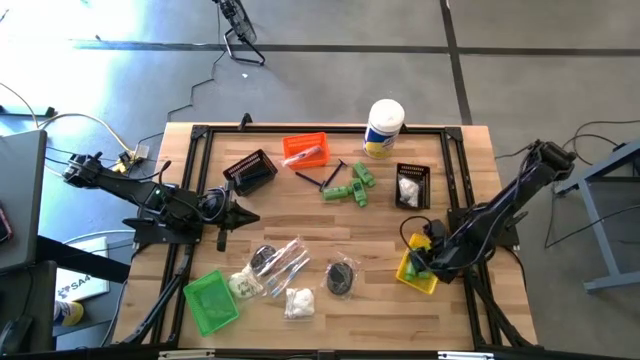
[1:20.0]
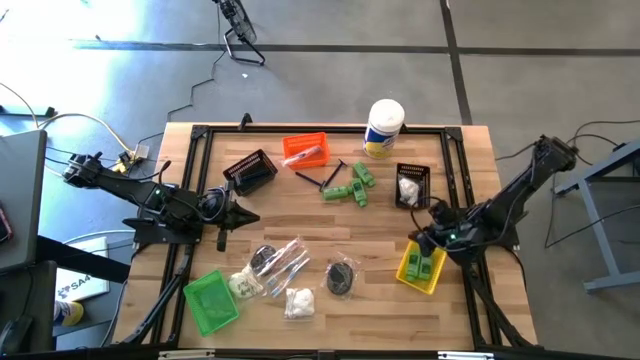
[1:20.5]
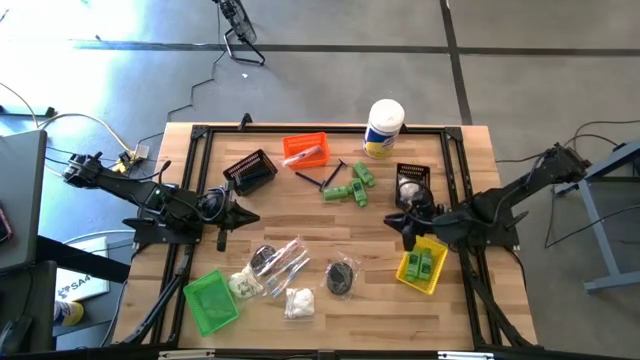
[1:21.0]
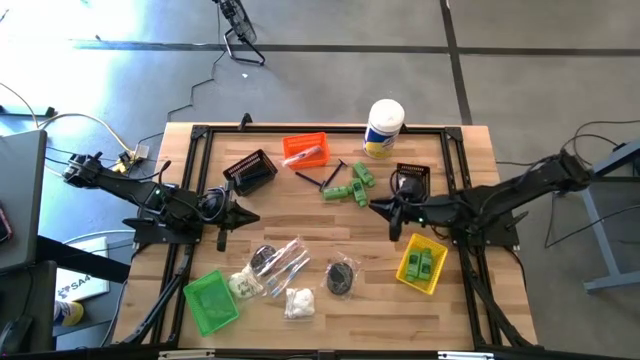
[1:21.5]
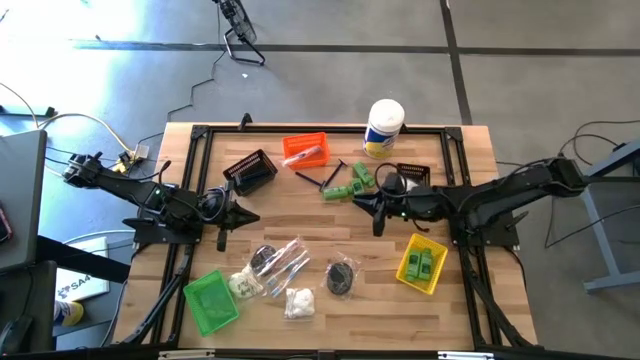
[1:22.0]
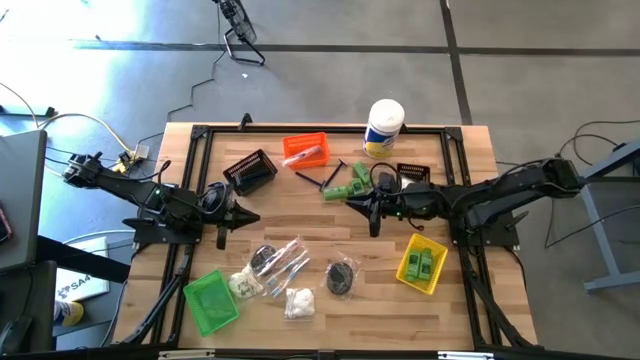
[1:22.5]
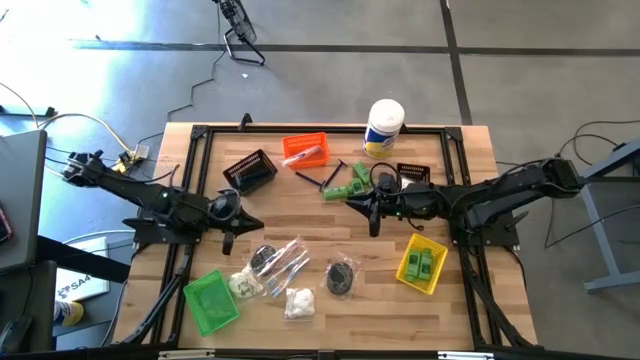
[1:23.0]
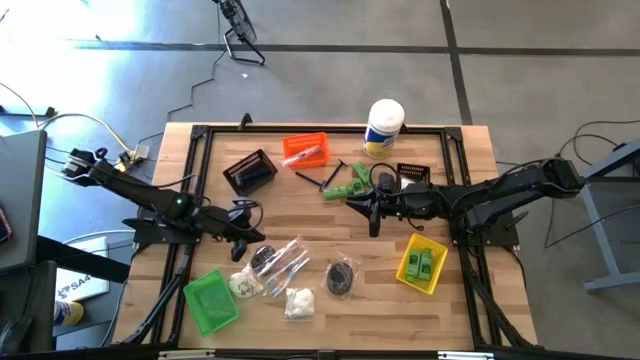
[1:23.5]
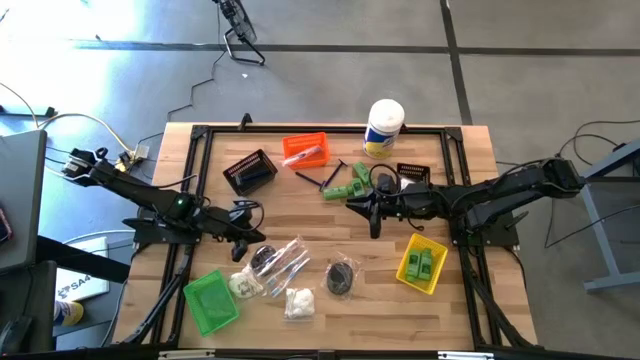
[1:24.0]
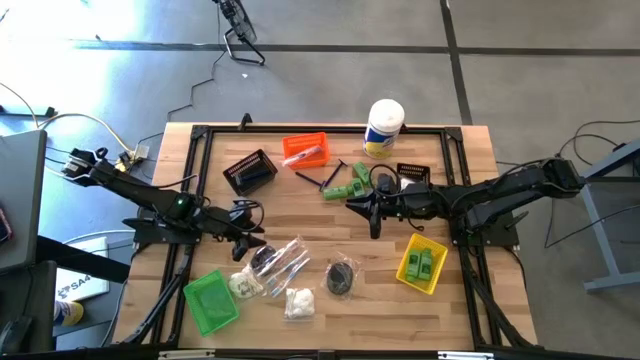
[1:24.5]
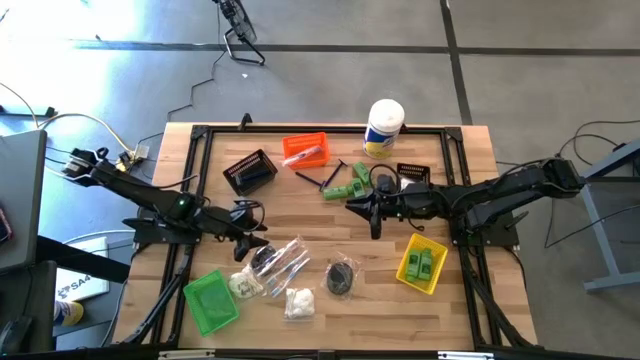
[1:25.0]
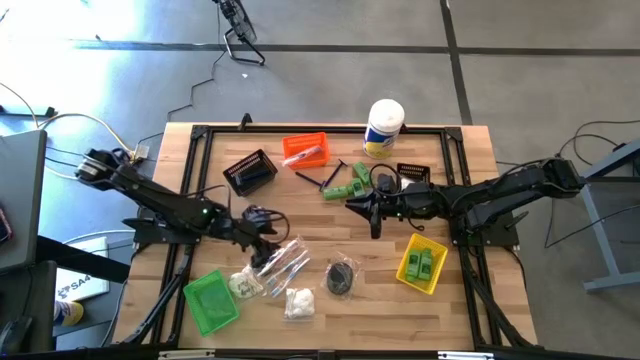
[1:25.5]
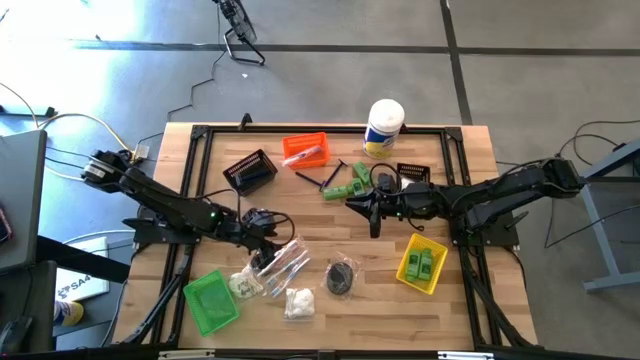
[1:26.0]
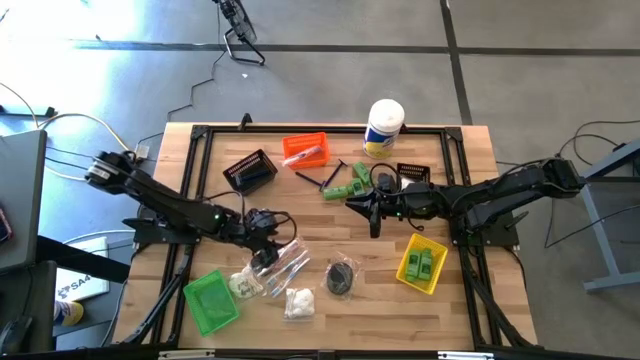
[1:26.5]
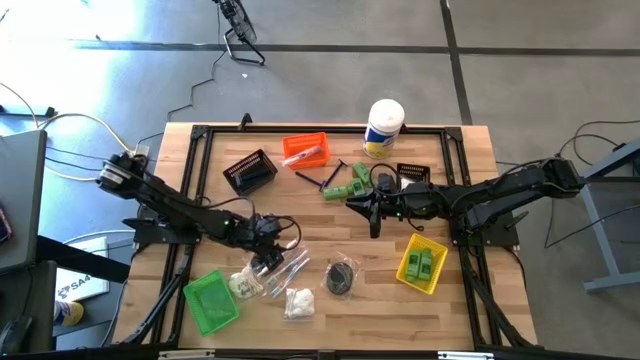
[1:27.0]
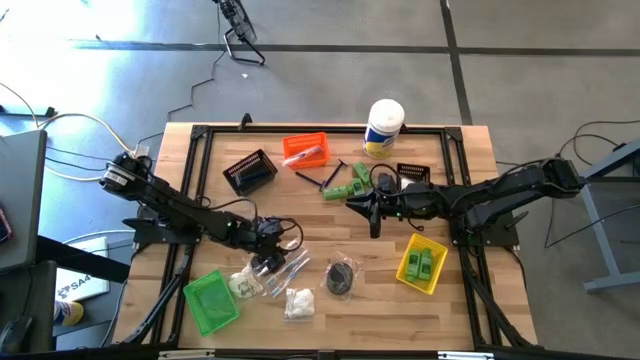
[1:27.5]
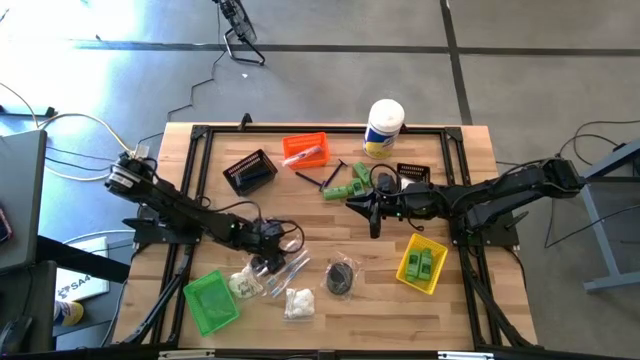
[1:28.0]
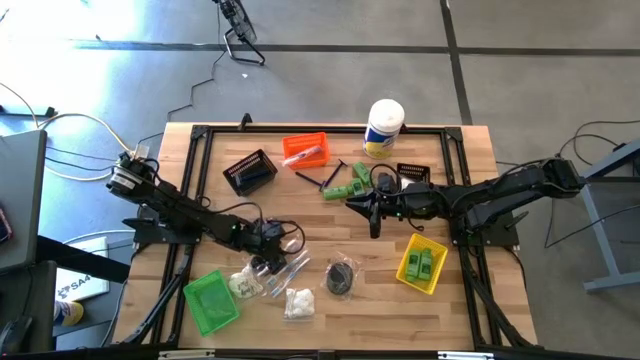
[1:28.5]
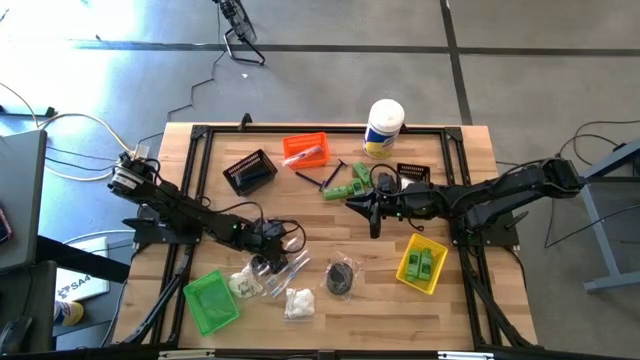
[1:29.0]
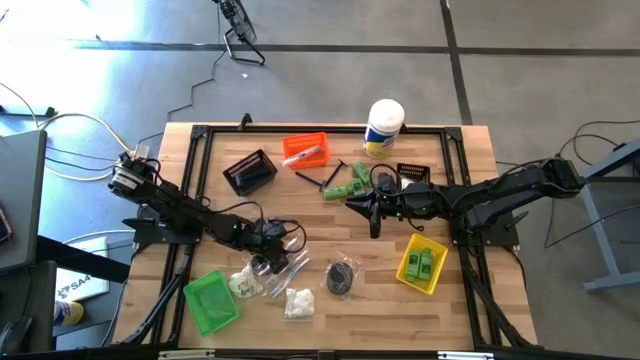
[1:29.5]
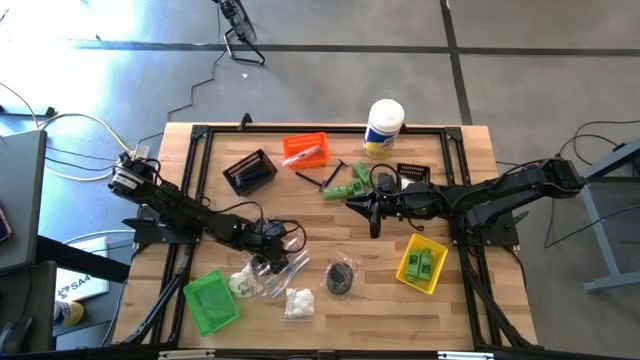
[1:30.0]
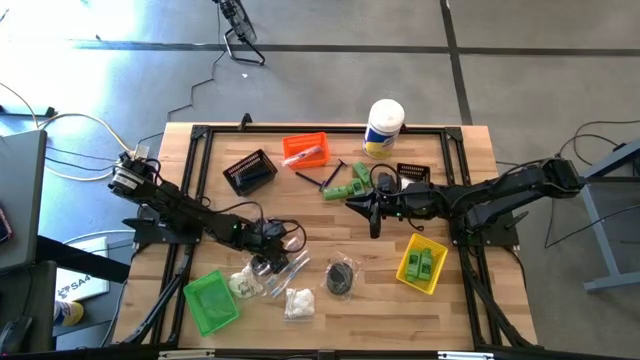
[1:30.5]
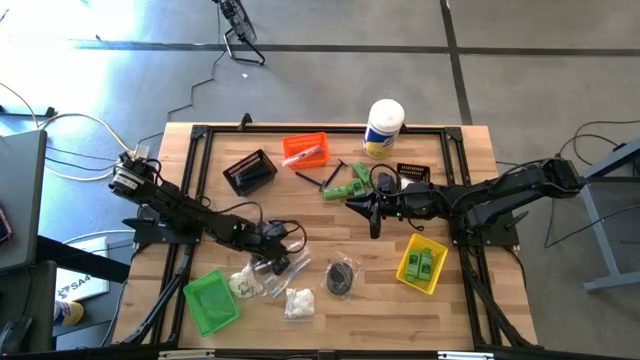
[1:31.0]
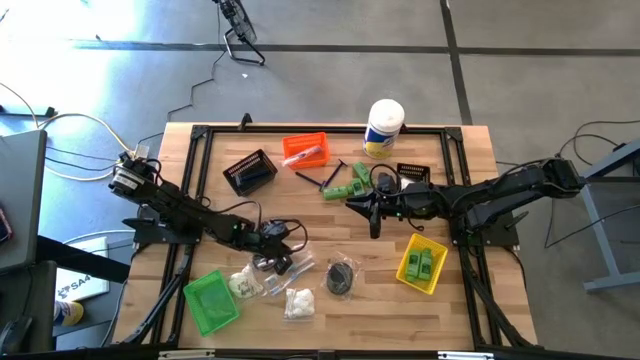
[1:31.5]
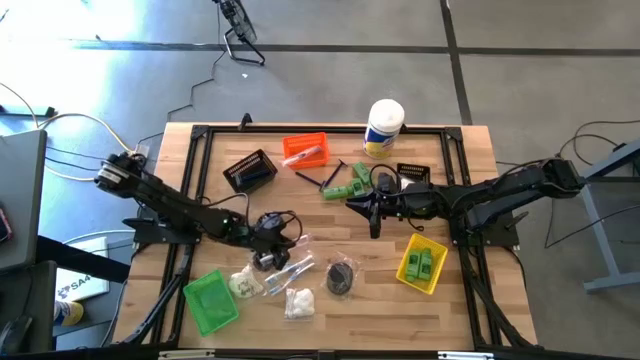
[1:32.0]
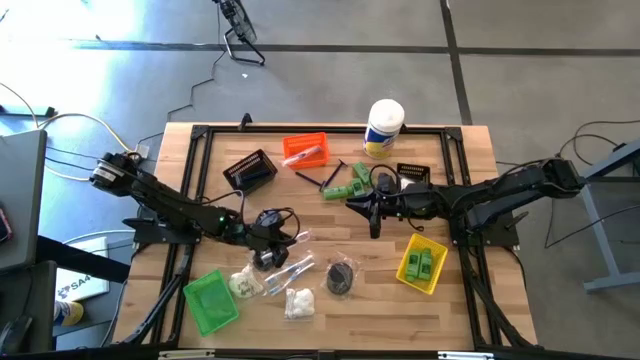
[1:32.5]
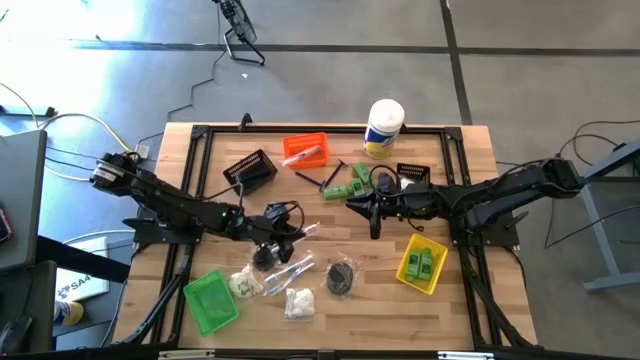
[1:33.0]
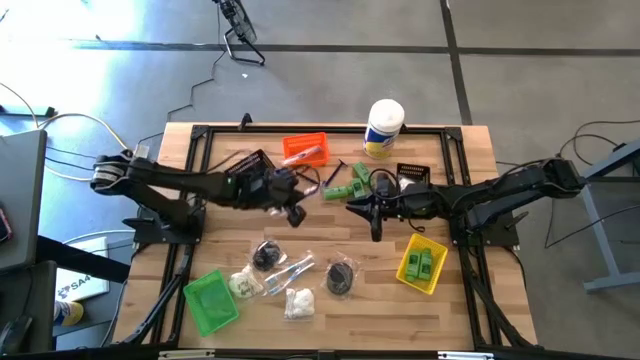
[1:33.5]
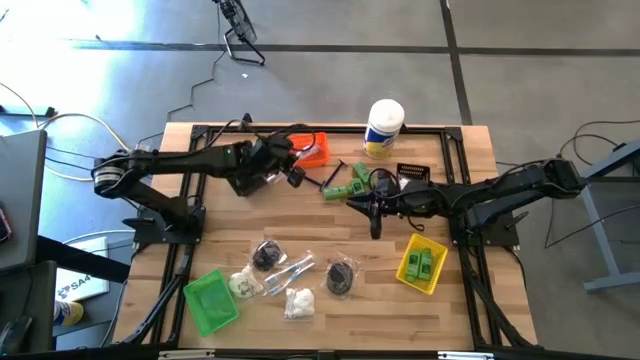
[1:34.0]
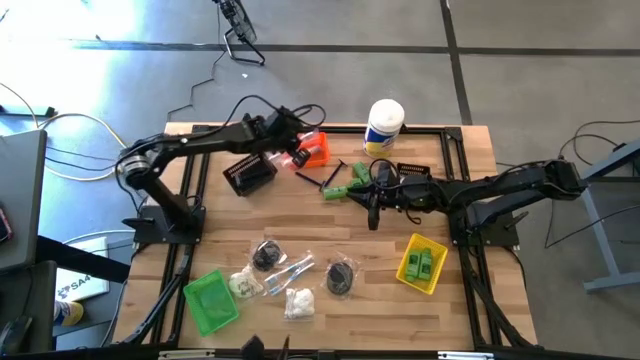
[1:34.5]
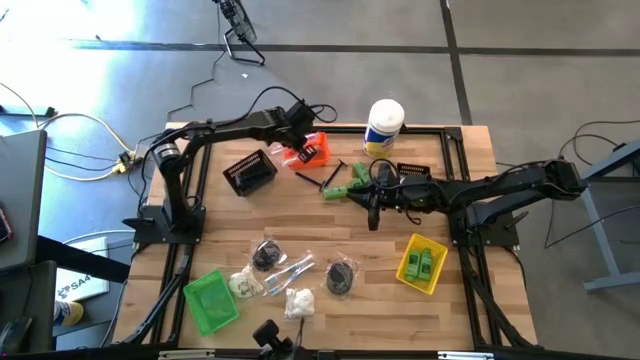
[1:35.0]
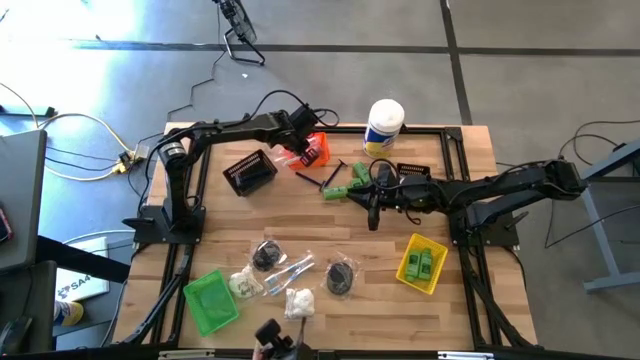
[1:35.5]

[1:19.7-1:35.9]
Task: Pick & Place Travel size toiletries
Put the red toothbrush into the orange bin

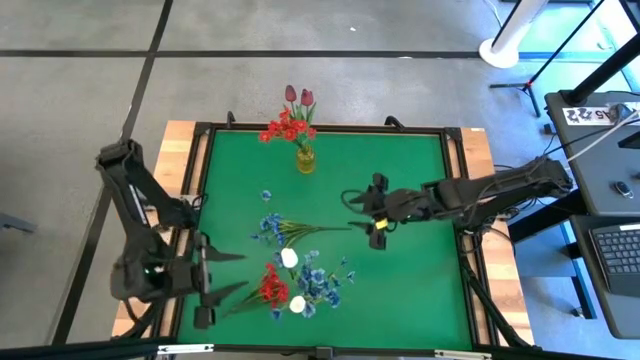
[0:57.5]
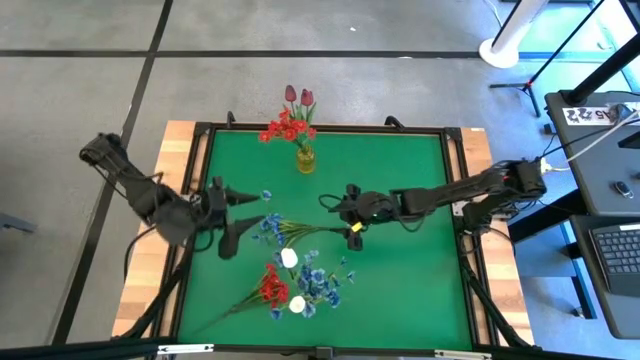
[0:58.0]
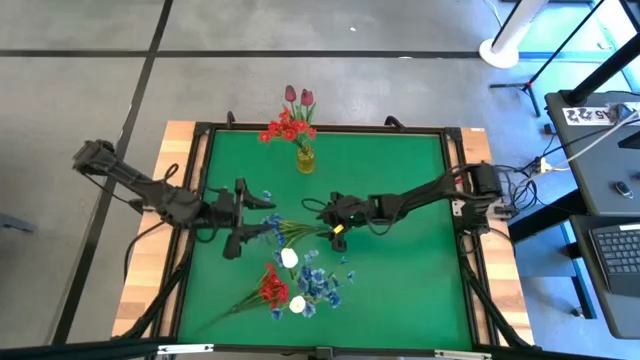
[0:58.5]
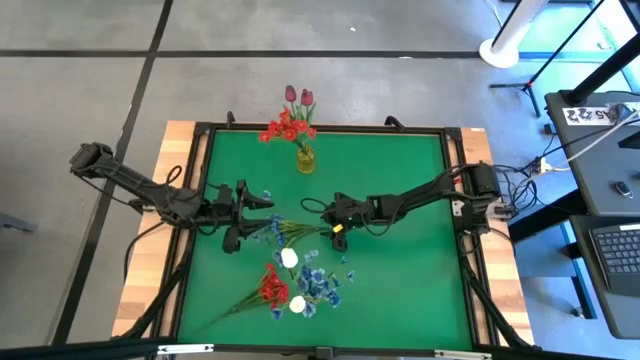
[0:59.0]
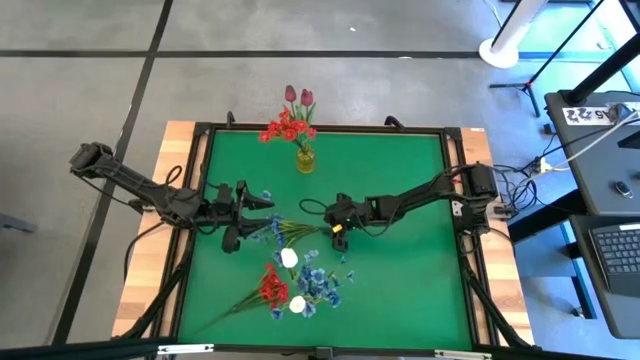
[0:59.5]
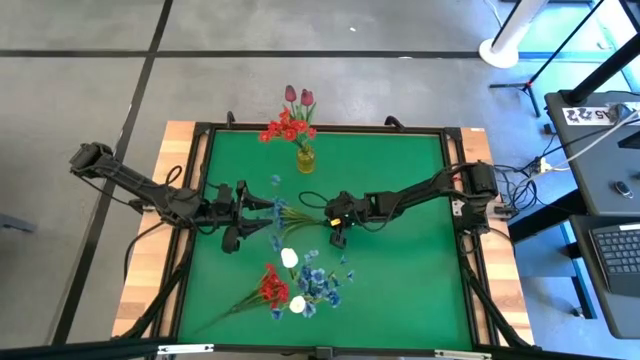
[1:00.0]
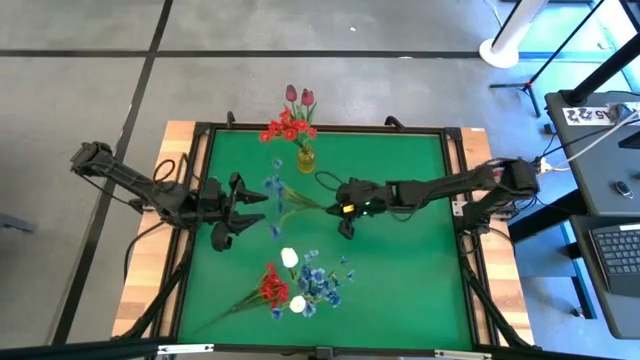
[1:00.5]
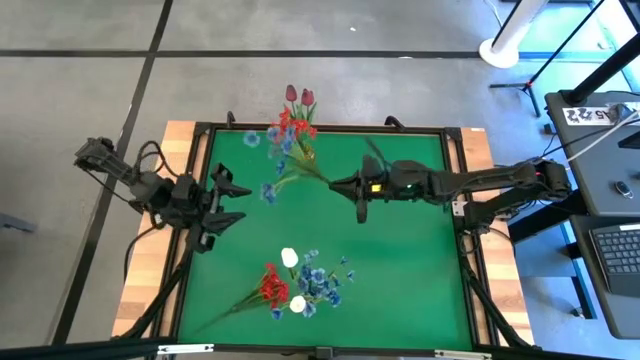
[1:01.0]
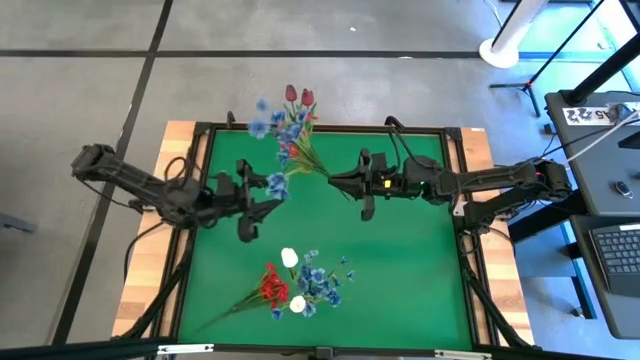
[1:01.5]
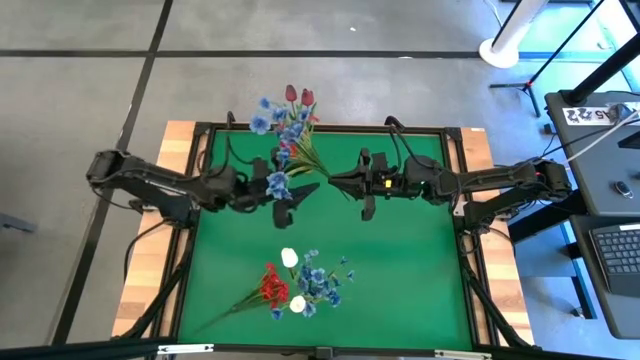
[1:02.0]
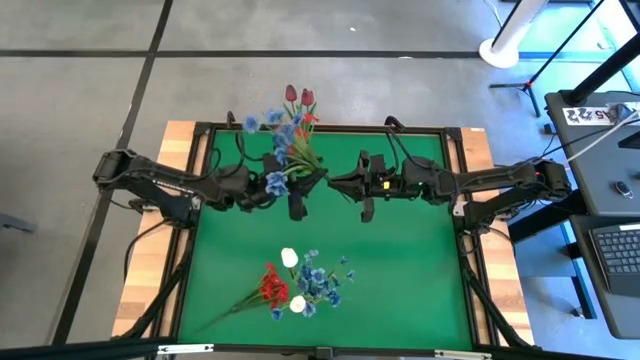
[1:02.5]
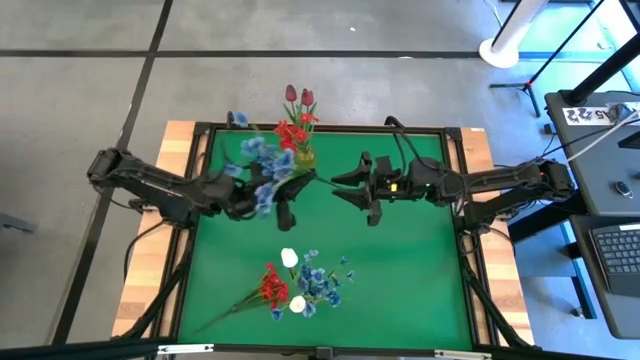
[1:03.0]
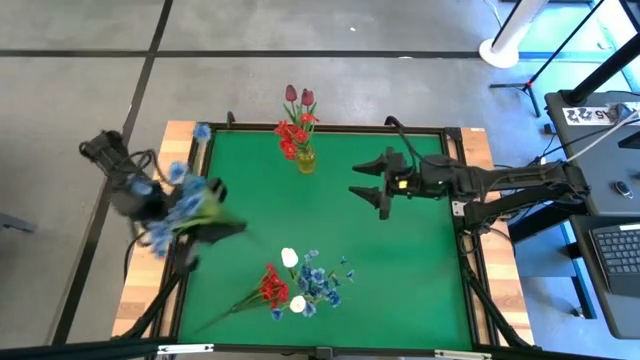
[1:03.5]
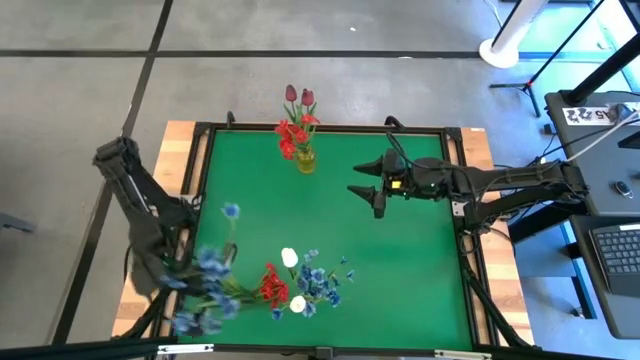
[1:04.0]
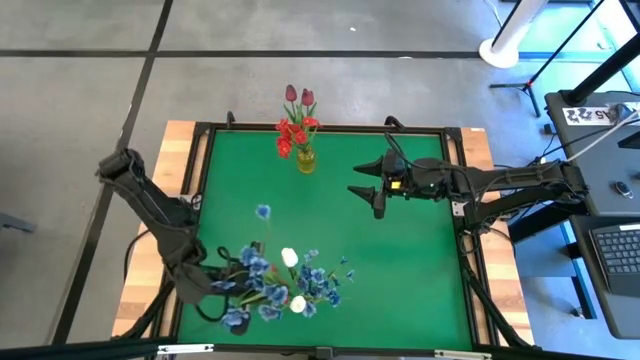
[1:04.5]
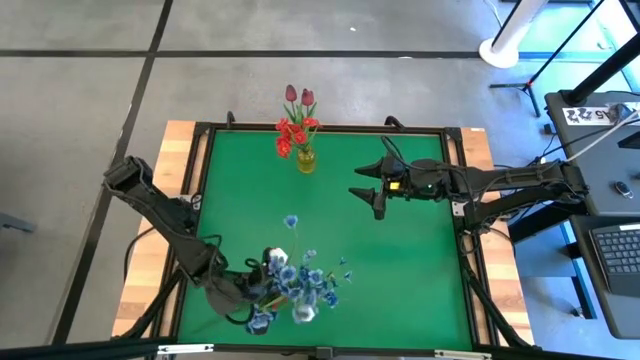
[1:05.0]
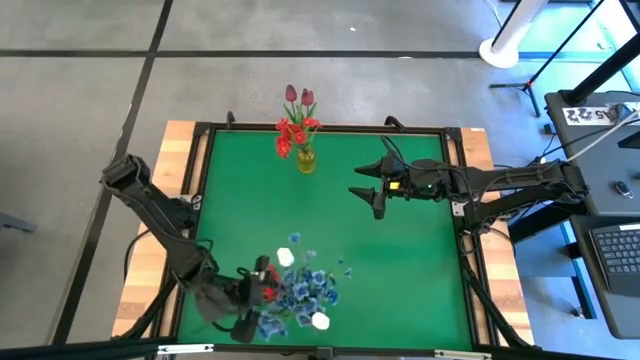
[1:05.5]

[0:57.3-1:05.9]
Task: Sort flowers into vase by color
Put the blue flowers into the transparent vase
